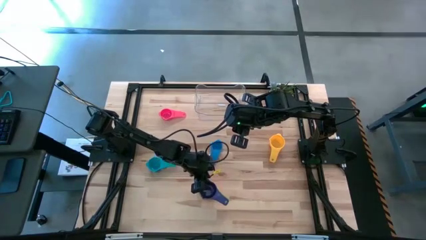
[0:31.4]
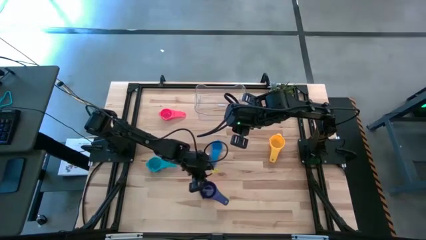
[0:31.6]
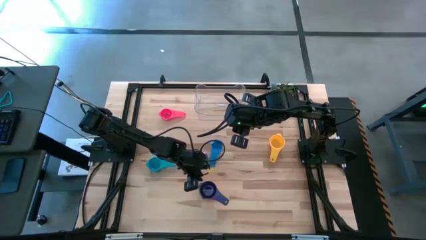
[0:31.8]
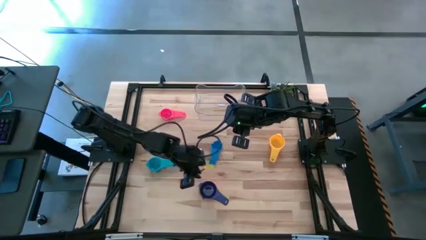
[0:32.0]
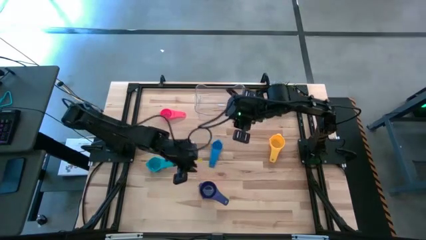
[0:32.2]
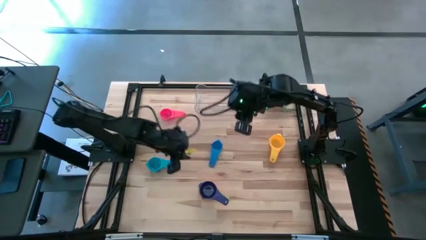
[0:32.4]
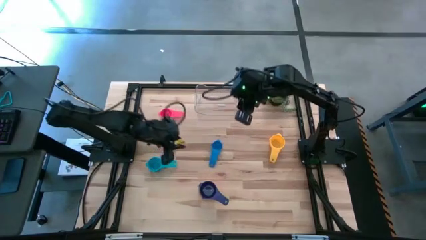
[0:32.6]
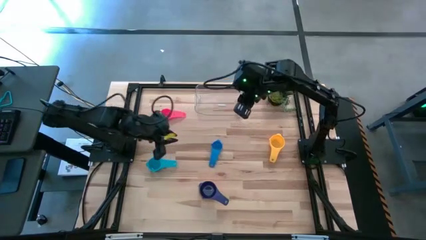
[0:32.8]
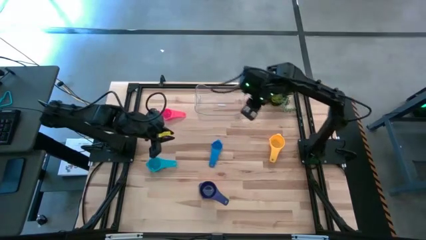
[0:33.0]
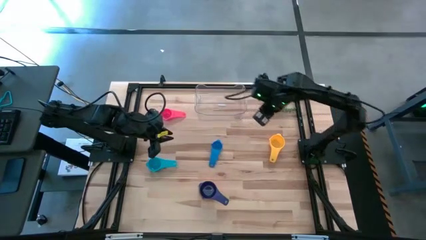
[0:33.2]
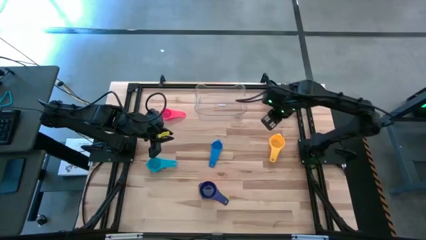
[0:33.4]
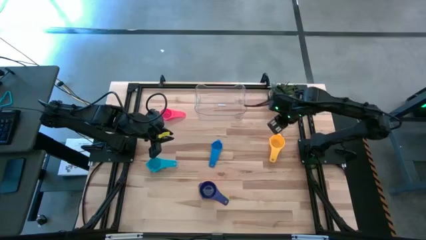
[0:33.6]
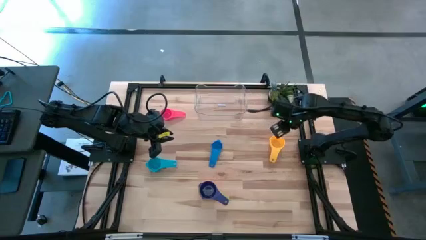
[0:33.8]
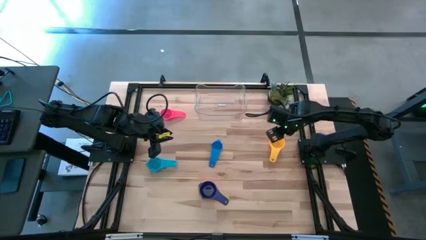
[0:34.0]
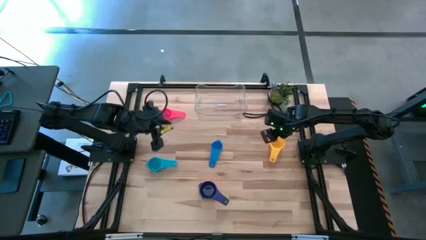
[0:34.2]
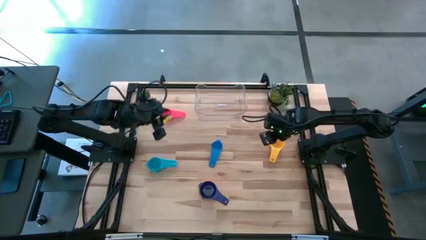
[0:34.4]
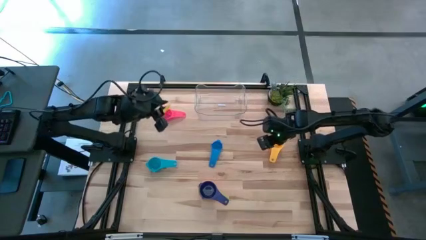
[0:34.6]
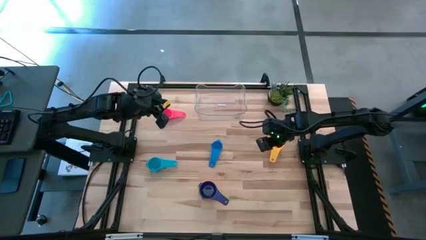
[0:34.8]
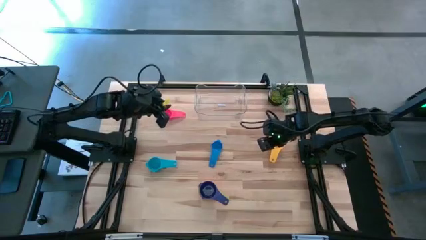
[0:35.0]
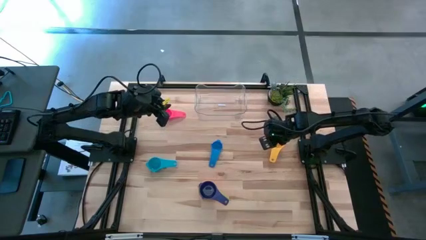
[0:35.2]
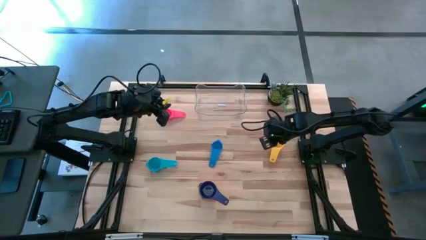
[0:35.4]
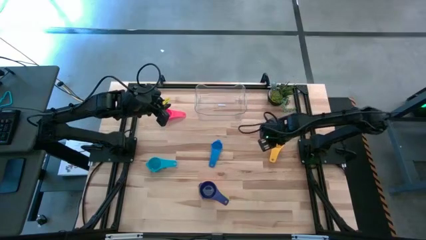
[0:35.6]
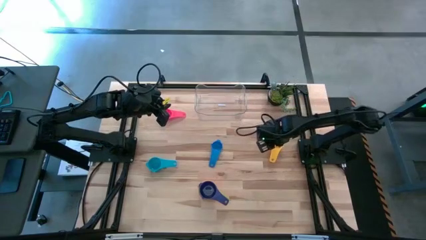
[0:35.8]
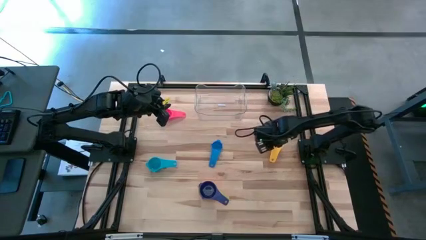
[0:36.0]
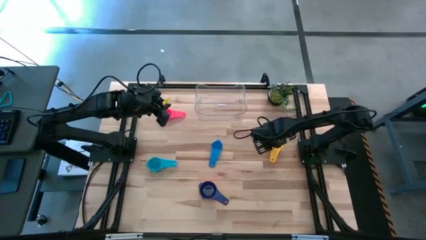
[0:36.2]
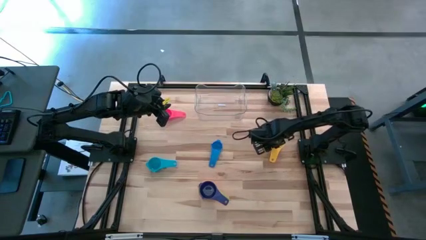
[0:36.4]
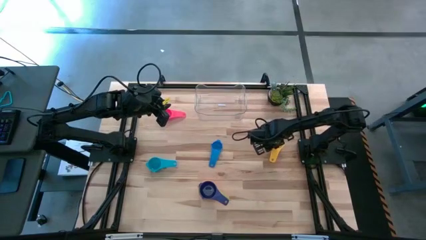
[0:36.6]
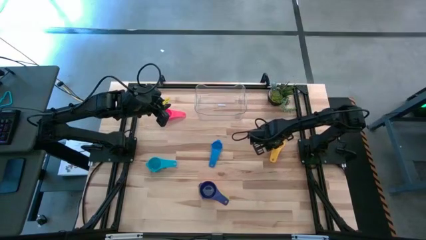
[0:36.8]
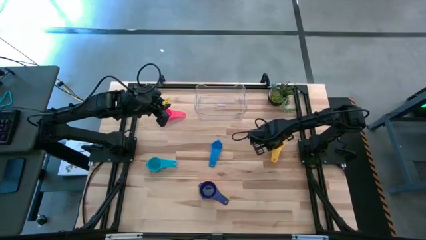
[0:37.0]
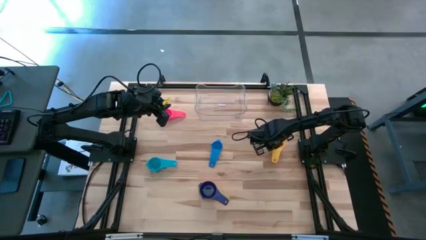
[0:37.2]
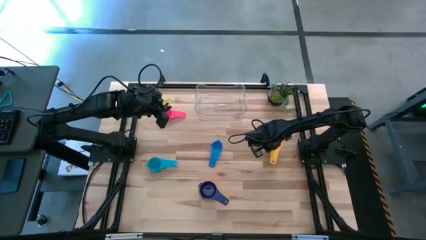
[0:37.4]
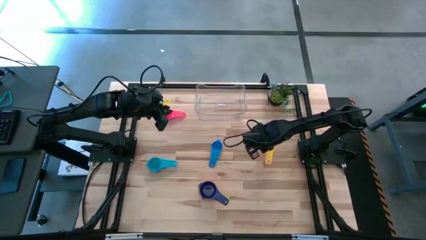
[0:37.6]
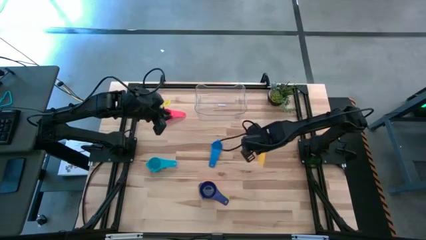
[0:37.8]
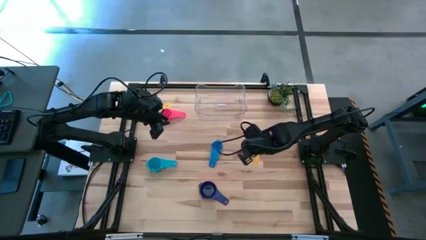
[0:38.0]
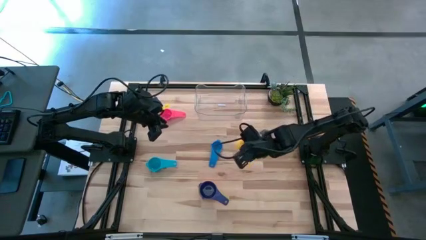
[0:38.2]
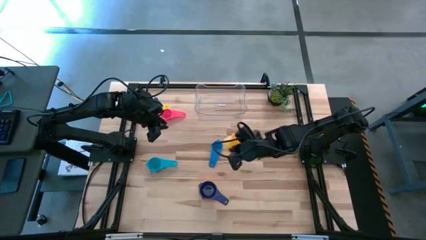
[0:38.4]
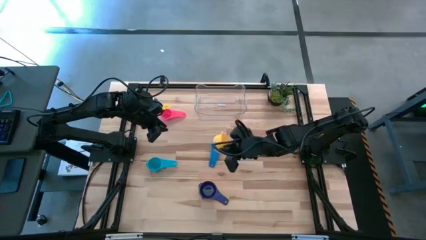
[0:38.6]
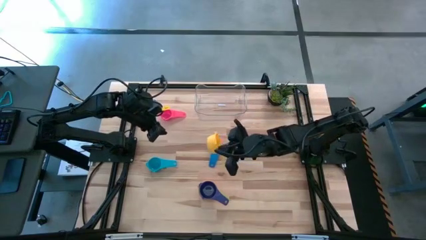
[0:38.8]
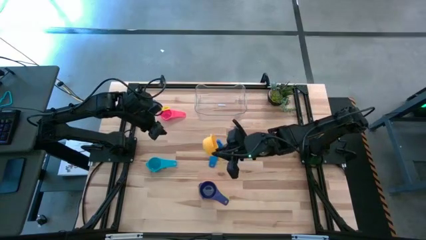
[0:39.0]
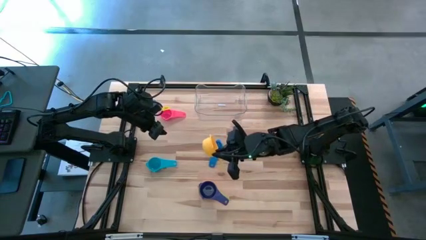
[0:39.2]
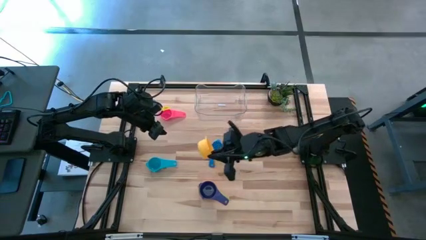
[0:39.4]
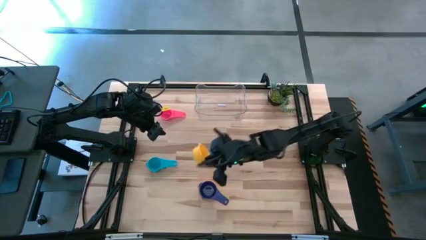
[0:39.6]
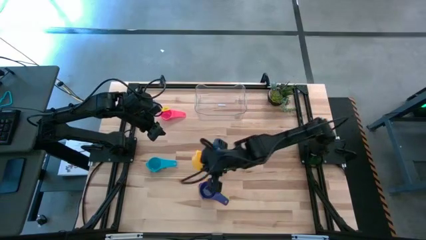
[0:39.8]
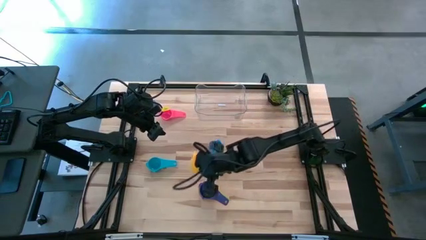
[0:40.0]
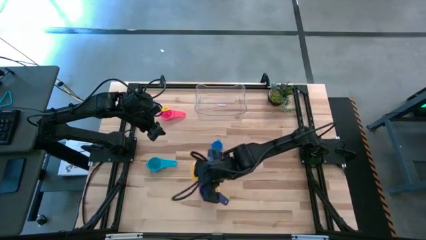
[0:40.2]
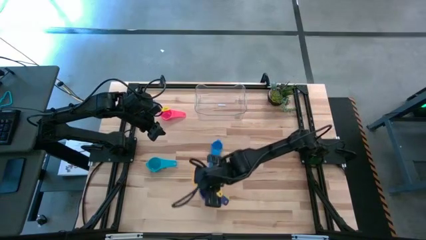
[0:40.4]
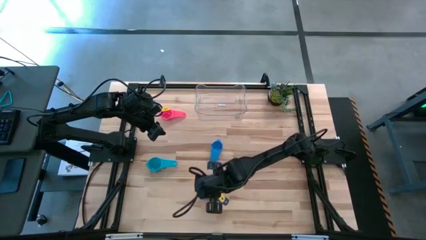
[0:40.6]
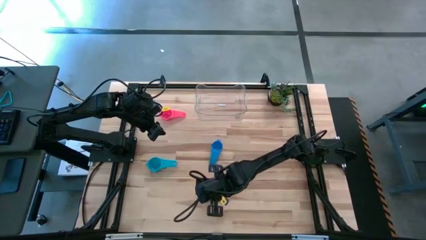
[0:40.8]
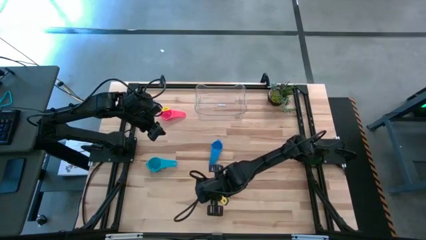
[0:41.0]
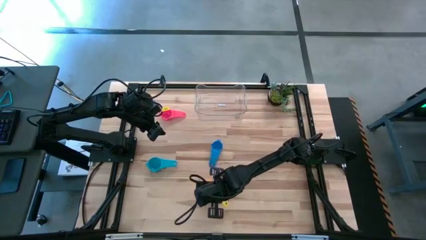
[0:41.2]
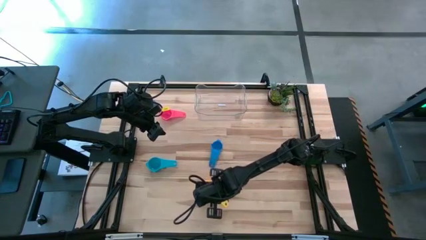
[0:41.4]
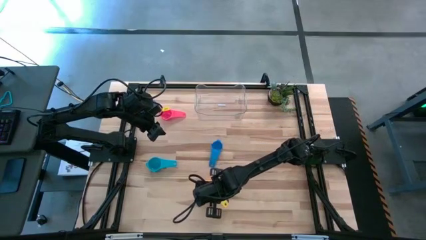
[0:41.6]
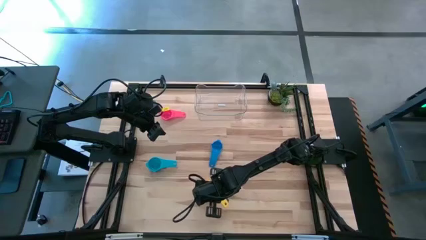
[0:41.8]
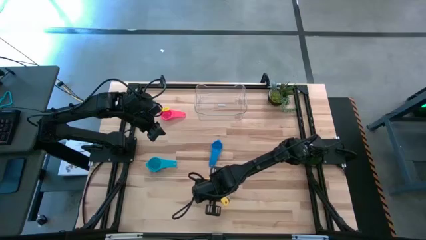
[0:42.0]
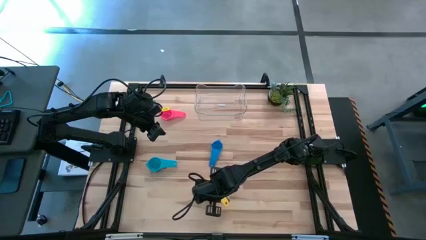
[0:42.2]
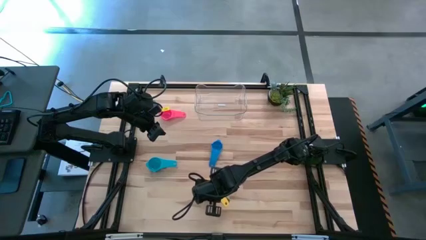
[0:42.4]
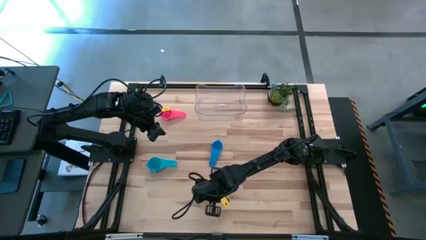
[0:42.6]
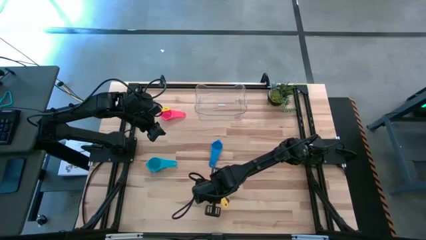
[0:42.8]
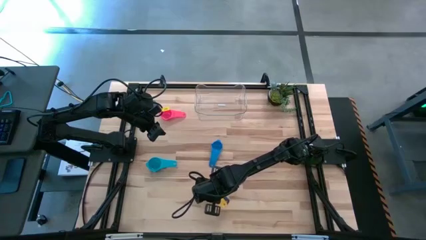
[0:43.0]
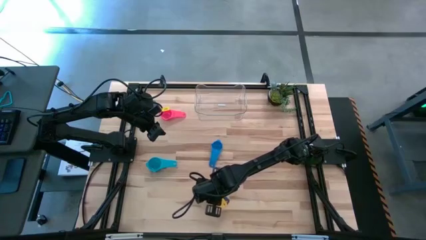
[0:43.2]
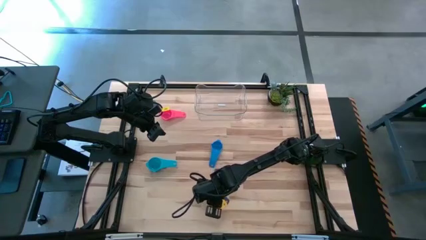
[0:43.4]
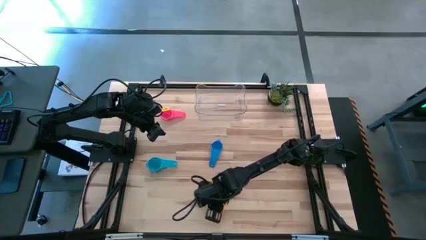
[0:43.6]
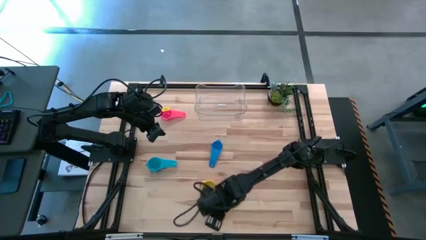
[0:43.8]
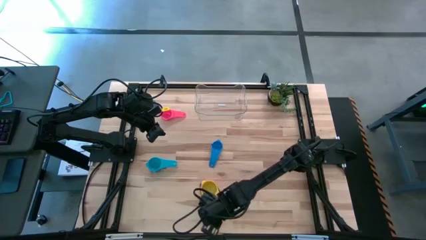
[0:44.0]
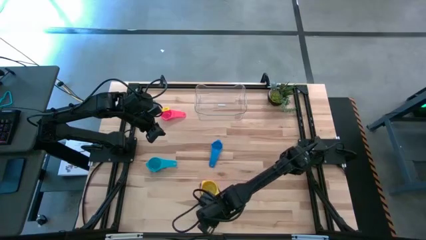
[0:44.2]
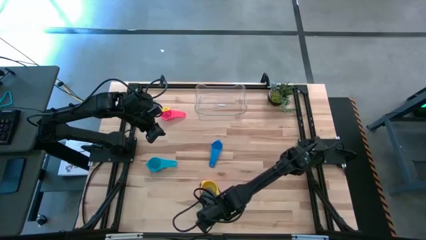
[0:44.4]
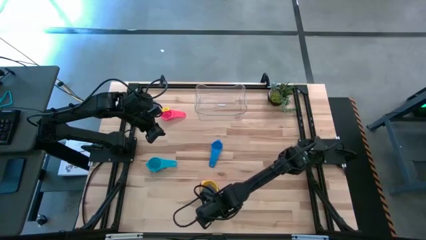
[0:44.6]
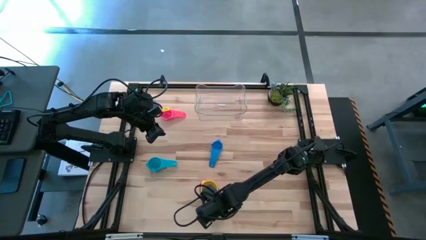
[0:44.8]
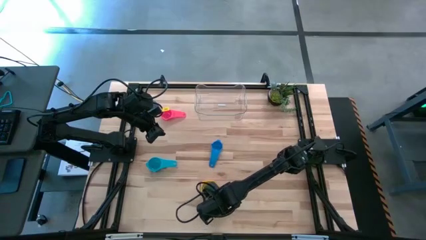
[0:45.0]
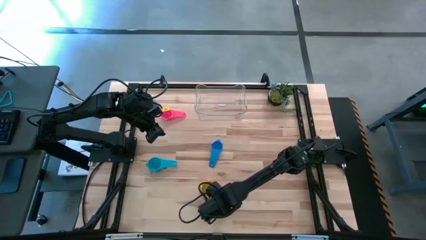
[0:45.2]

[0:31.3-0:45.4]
Task: Nest measuring cups in basket
Stack the yellow measuring cup in the dark blue measuring cup

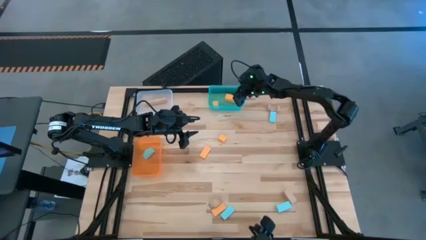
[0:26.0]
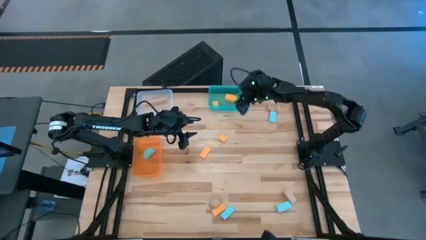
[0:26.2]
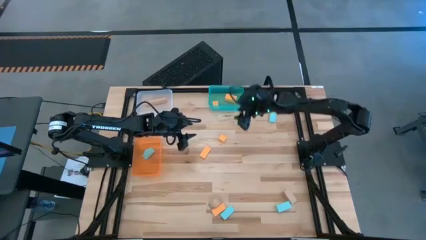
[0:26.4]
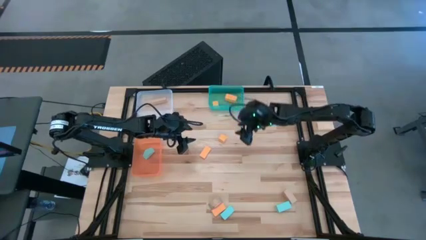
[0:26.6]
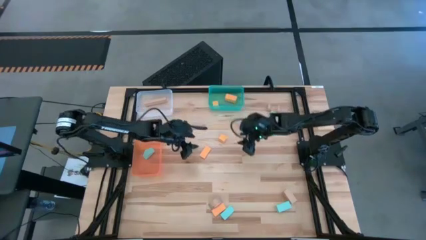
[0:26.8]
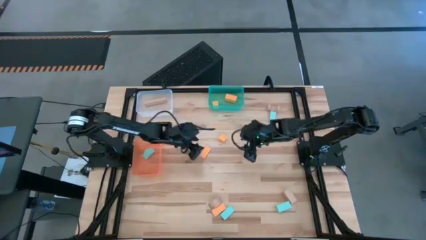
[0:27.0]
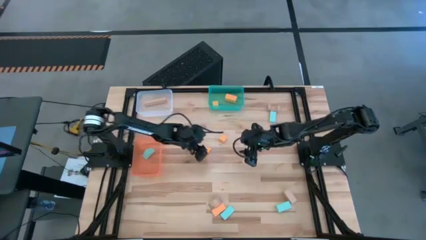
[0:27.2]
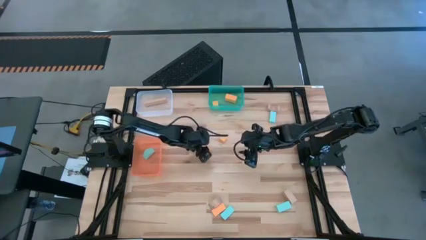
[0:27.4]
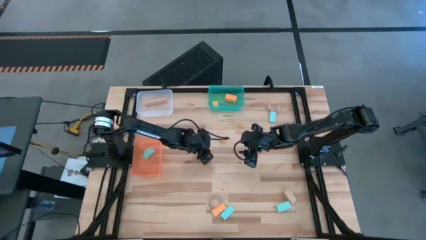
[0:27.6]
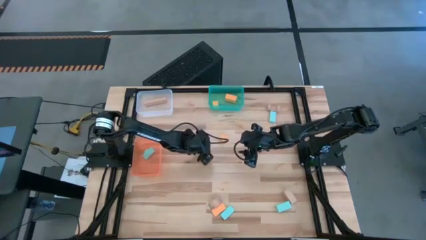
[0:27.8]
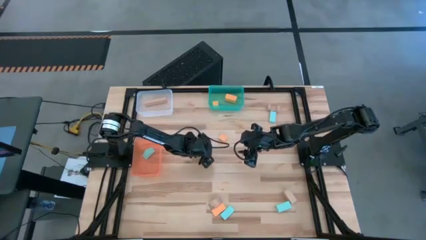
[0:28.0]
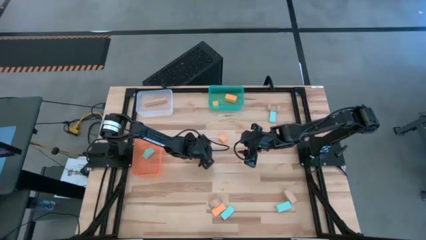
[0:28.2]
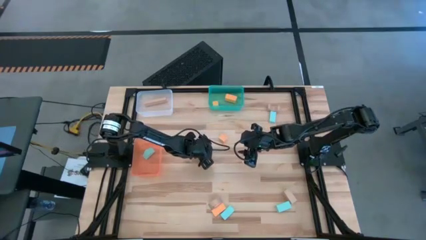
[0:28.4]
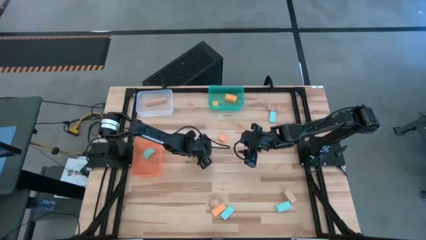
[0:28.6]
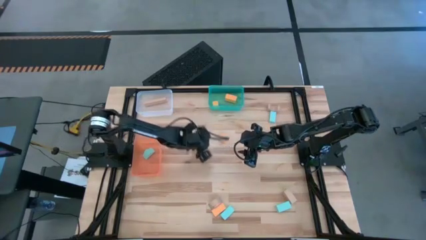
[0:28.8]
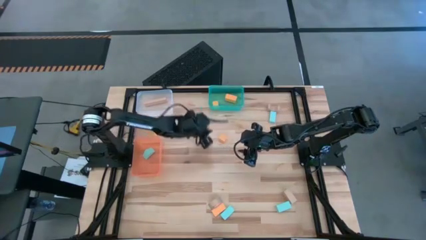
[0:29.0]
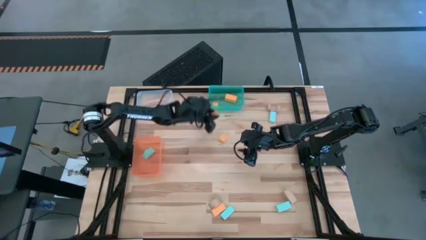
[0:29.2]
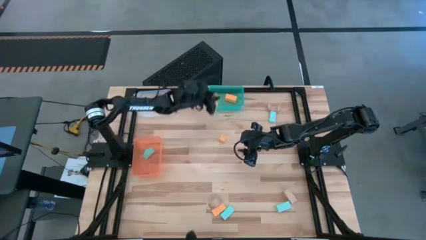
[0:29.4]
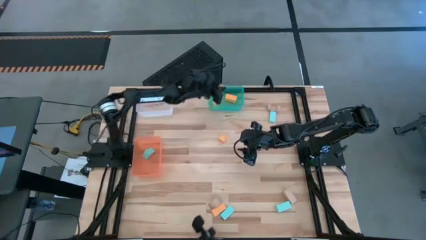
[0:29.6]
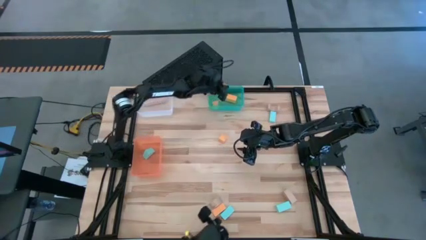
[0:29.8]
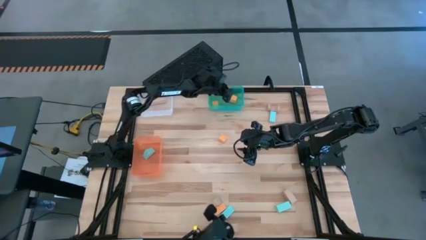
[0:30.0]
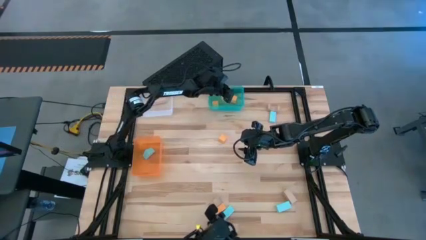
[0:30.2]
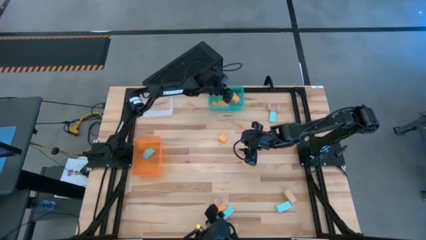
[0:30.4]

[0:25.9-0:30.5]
Task: Sort & place blocks by color
Put the yellow block into the green bin
